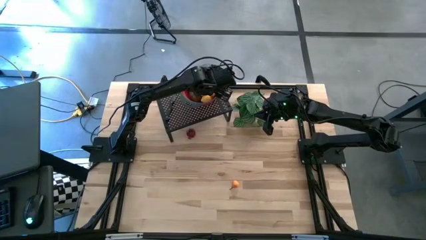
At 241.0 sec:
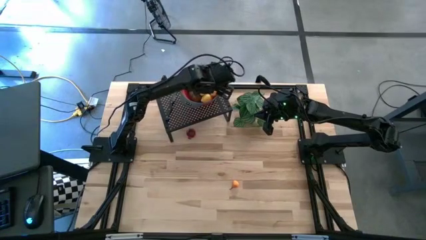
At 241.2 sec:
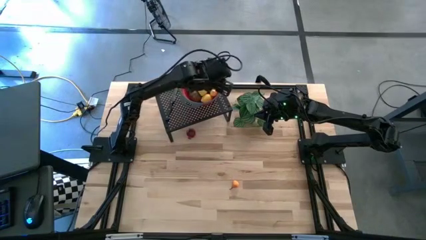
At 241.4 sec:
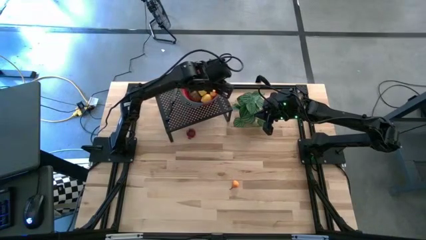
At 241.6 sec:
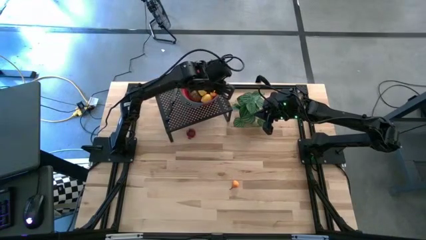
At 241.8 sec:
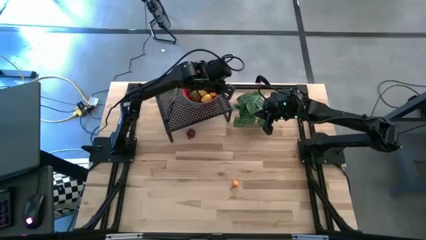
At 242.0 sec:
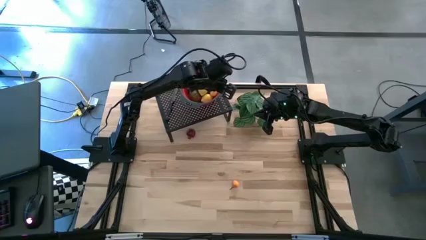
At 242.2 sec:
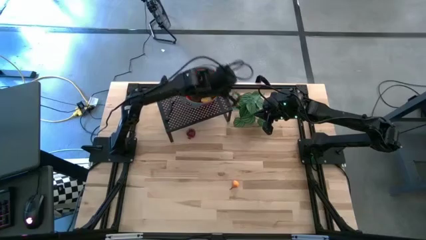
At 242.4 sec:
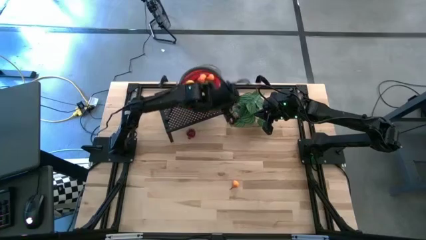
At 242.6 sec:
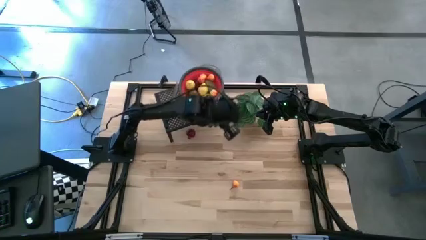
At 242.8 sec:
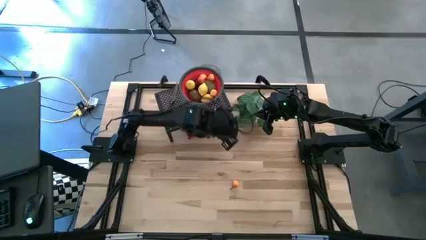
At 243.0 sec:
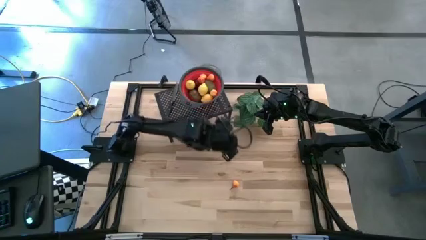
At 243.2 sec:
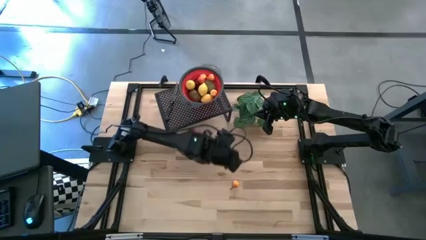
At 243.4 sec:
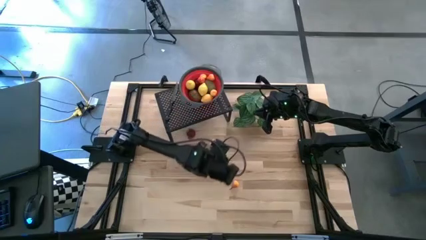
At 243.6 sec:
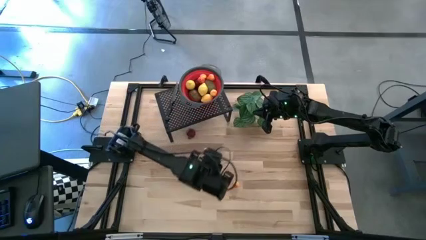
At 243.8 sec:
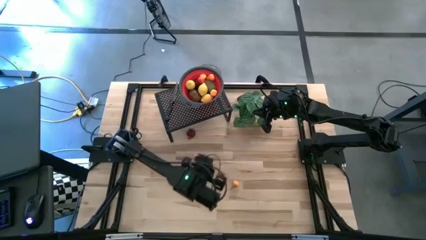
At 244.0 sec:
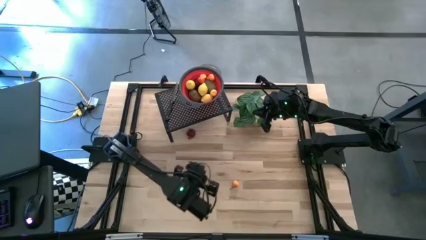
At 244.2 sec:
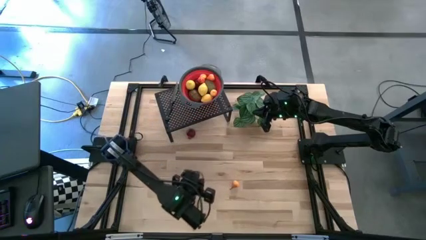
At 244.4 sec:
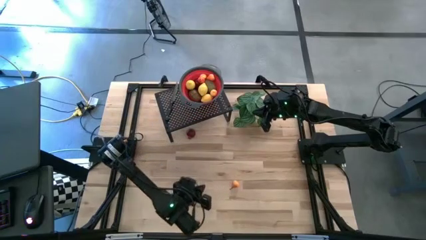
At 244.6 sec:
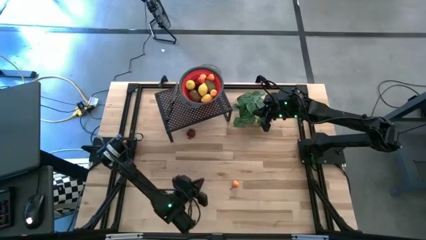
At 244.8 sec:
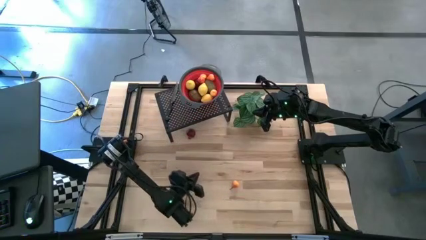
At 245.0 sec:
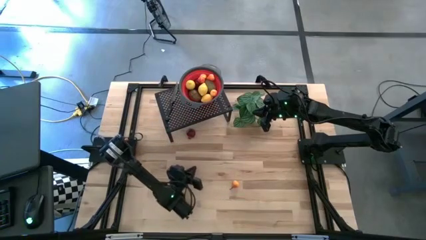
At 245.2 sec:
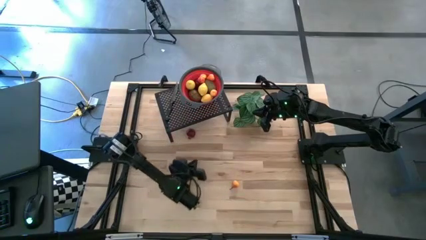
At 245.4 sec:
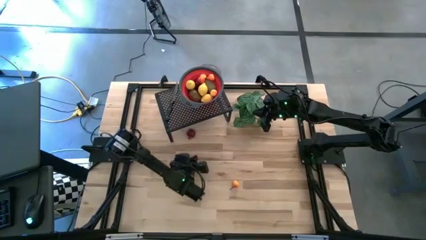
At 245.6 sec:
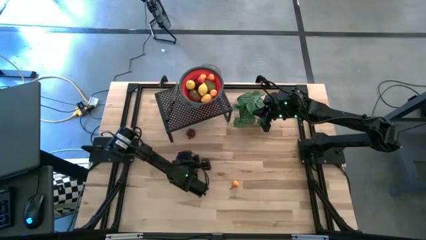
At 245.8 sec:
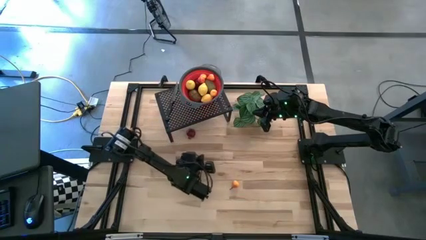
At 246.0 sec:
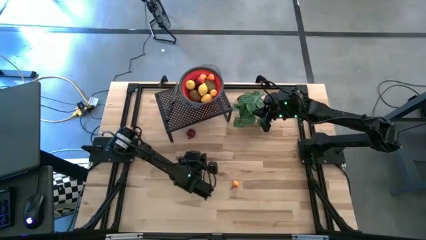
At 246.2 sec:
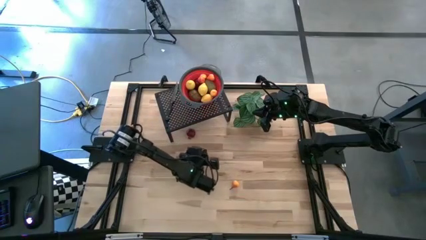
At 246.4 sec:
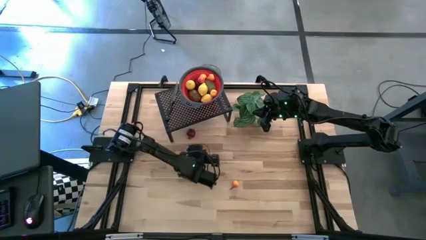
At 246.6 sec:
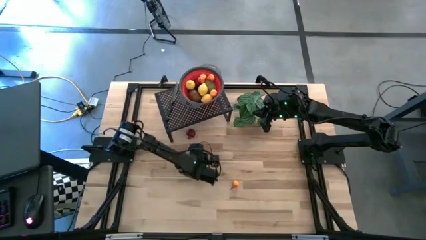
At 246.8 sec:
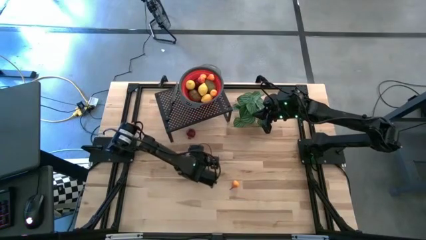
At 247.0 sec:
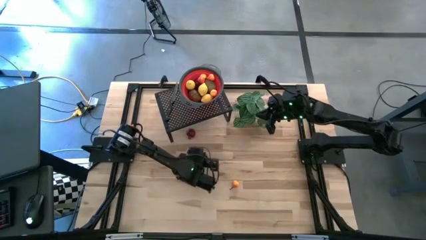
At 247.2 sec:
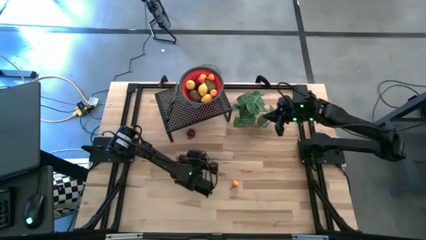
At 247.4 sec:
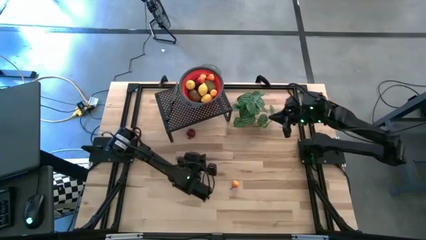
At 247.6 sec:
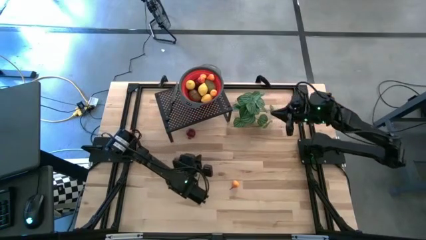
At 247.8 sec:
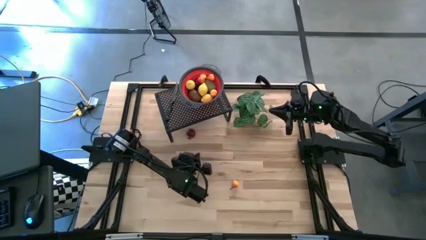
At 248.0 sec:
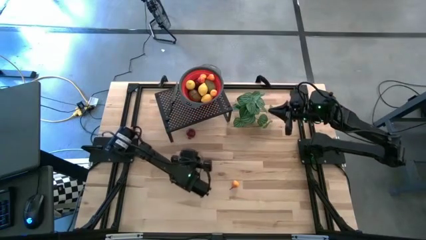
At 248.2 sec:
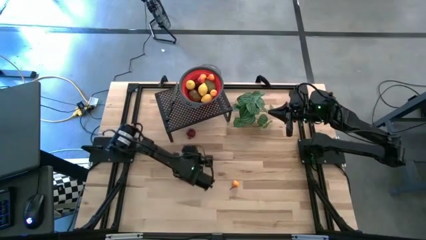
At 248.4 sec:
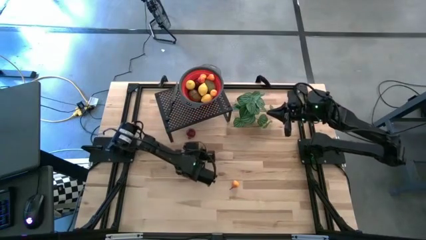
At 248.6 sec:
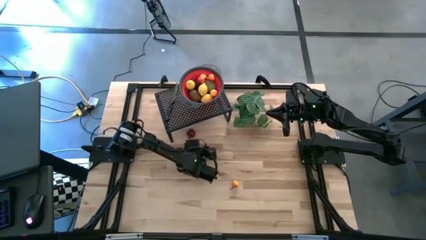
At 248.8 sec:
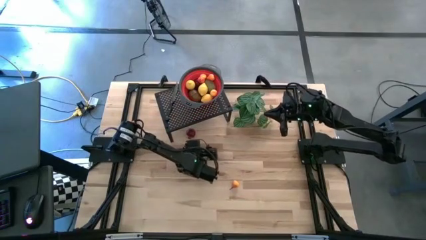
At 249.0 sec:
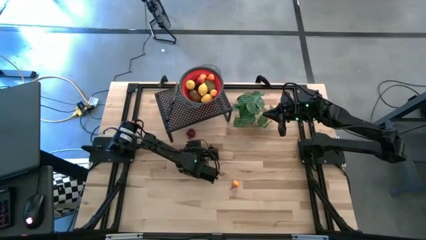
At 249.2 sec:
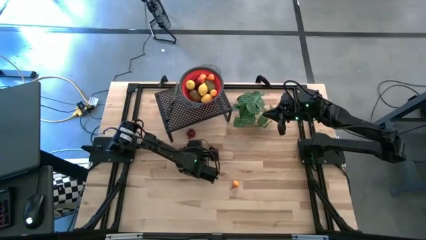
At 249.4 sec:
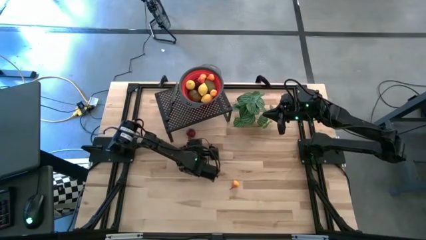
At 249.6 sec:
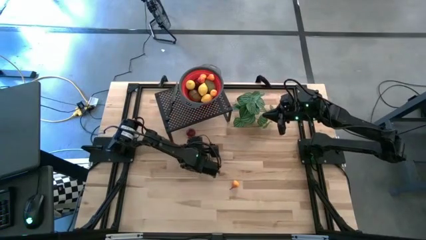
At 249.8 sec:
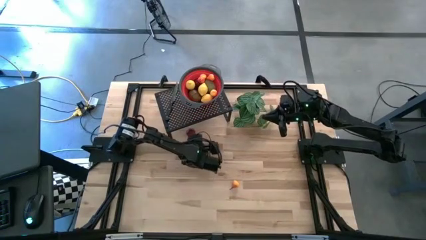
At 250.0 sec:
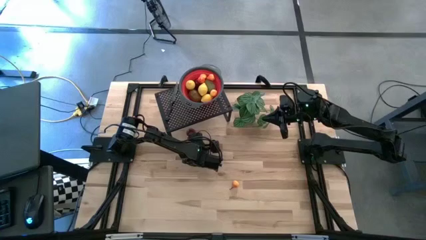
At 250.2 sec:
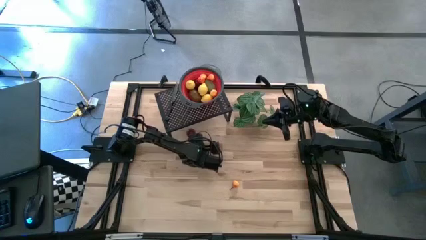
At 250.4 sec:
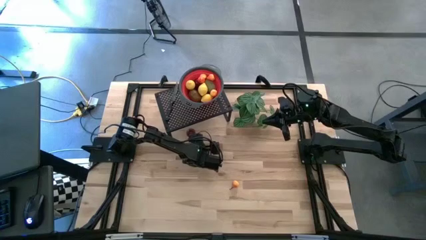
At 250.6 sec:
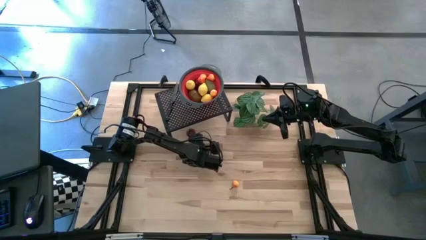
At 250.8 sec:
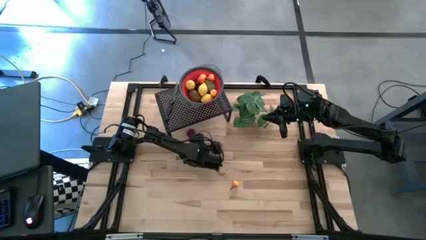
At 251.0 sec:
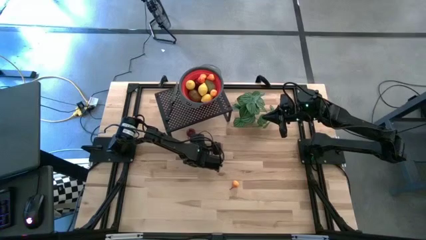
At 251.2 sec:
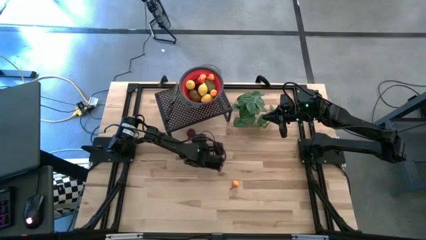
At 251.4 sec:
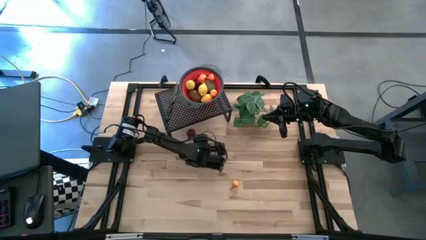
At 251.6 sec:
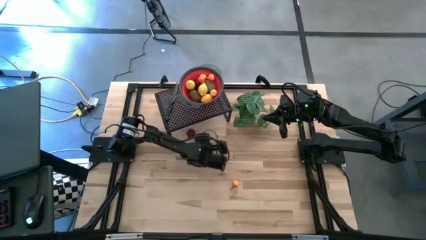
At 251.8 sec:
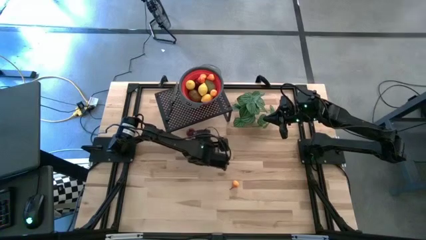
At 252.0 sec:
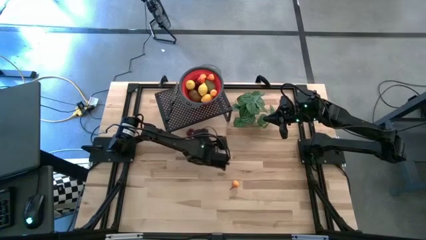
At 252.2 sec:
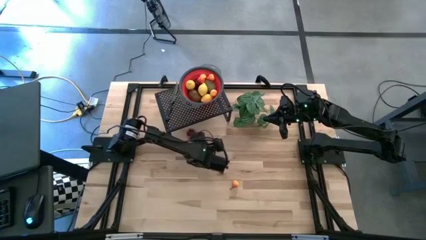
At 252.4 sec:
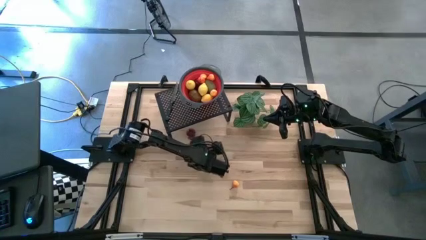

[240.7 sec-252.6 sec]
Task: Pick & Place Fruit
Put the red pomegranate into the red basket on the shelf
